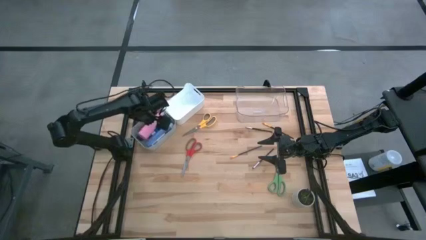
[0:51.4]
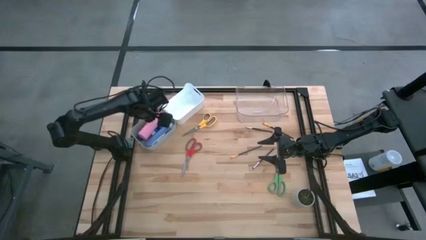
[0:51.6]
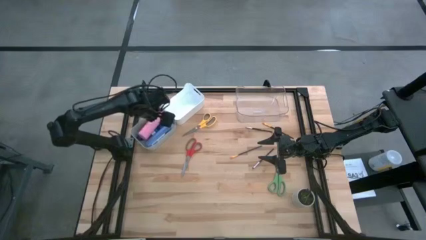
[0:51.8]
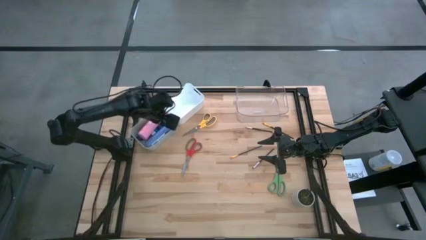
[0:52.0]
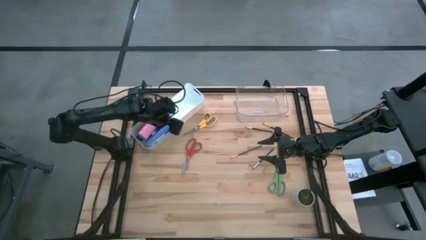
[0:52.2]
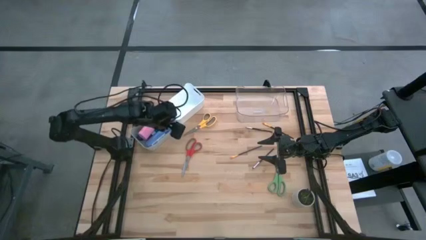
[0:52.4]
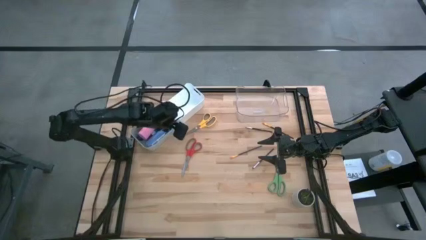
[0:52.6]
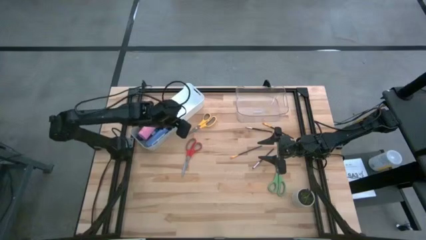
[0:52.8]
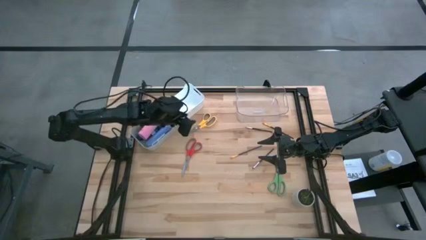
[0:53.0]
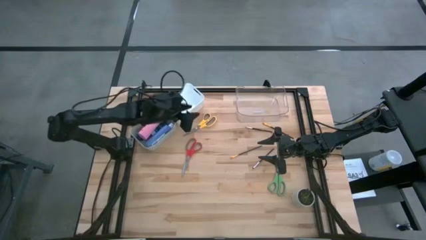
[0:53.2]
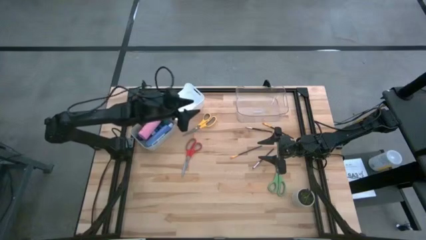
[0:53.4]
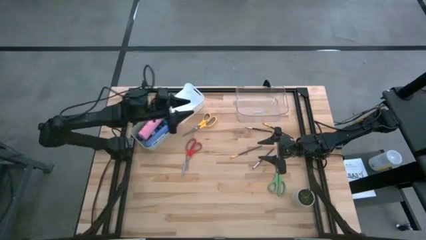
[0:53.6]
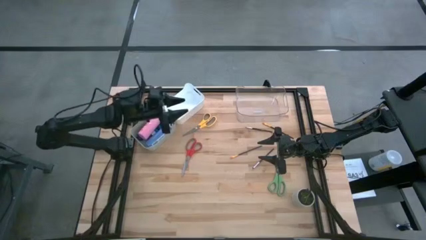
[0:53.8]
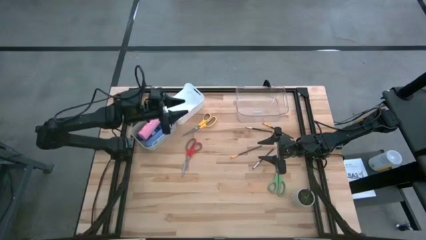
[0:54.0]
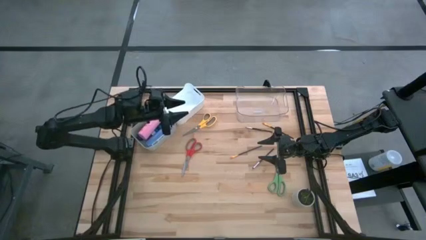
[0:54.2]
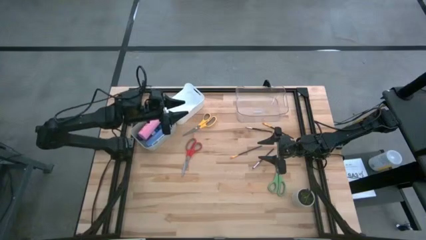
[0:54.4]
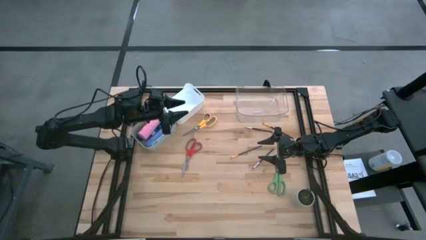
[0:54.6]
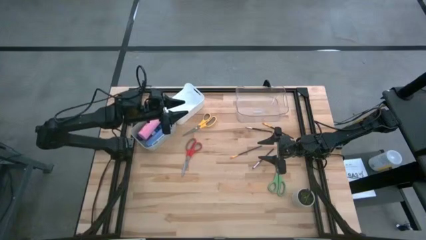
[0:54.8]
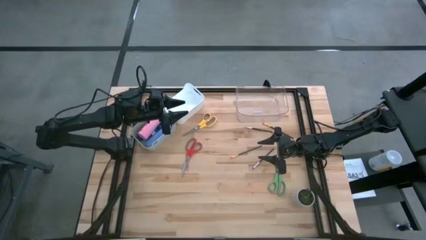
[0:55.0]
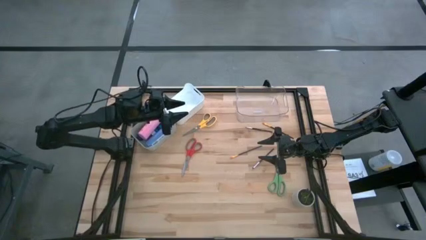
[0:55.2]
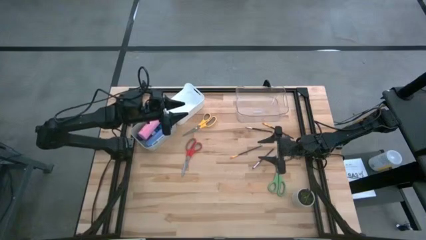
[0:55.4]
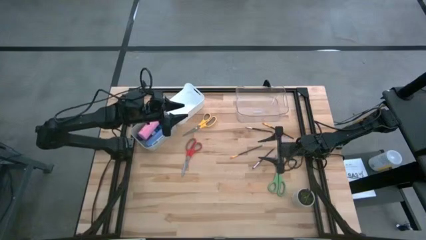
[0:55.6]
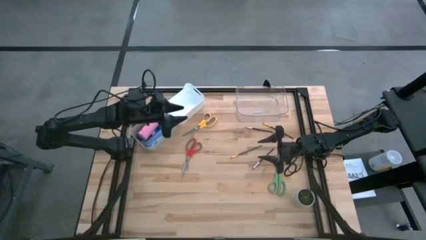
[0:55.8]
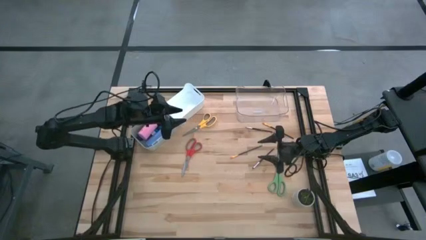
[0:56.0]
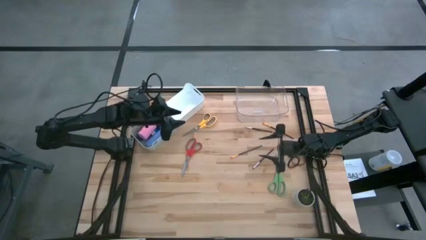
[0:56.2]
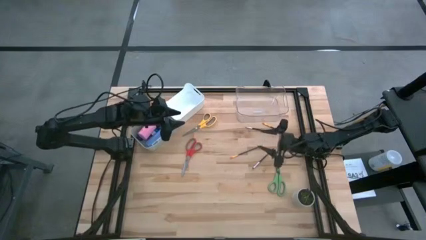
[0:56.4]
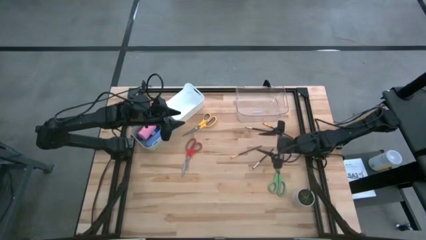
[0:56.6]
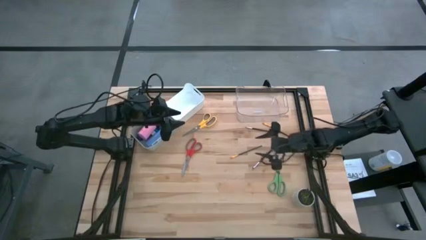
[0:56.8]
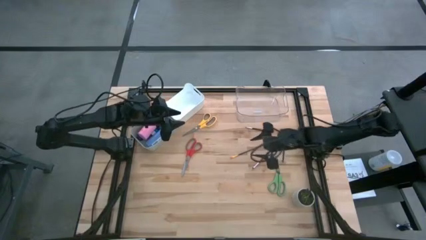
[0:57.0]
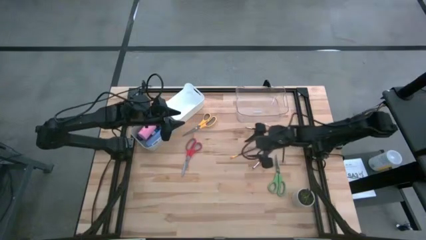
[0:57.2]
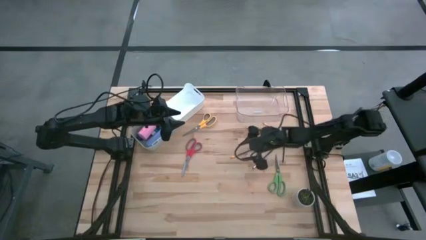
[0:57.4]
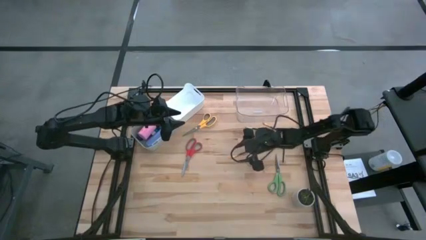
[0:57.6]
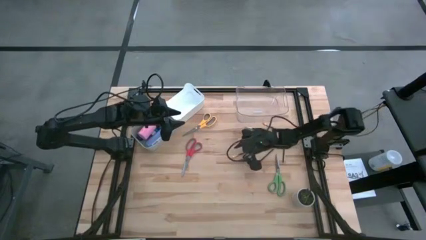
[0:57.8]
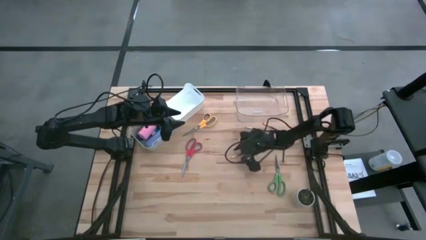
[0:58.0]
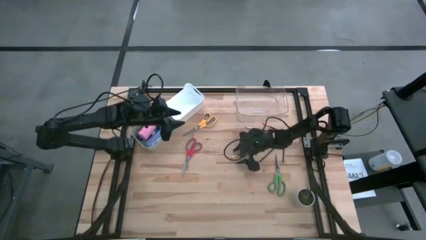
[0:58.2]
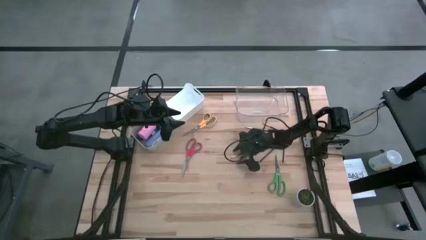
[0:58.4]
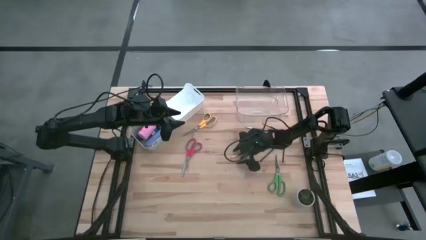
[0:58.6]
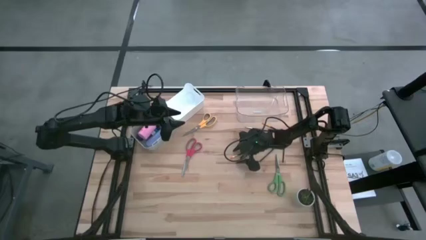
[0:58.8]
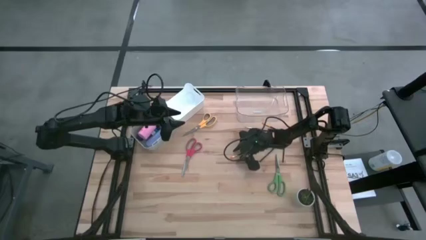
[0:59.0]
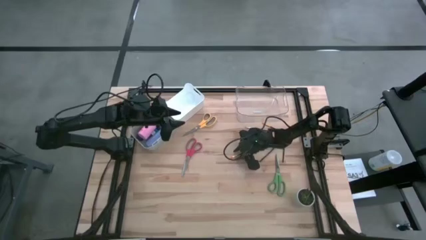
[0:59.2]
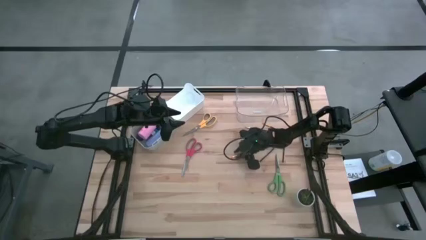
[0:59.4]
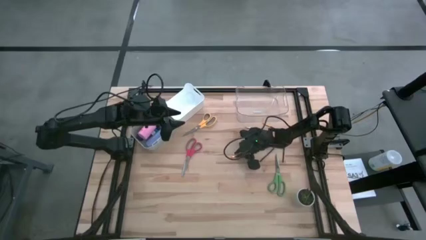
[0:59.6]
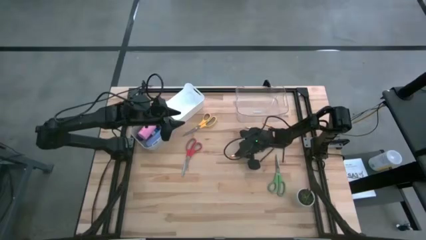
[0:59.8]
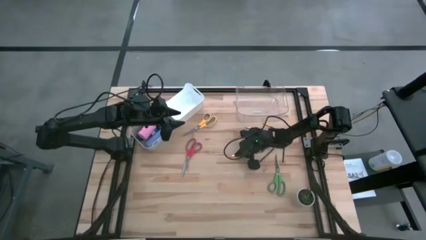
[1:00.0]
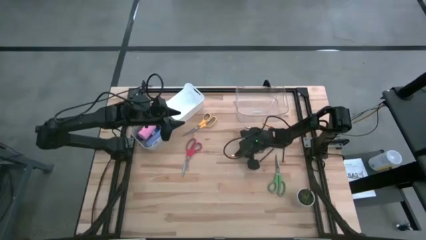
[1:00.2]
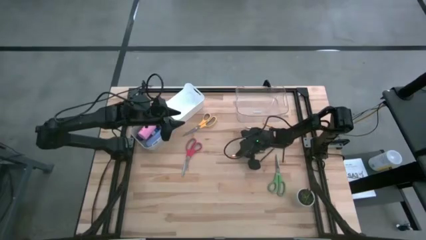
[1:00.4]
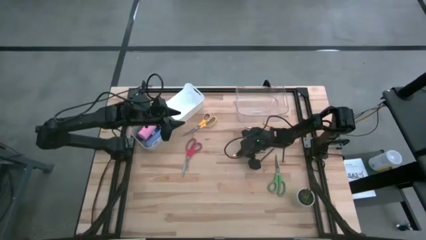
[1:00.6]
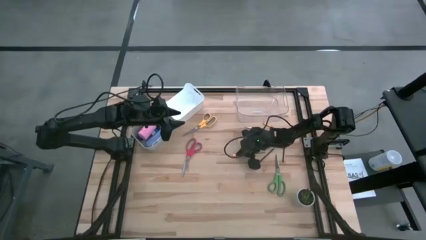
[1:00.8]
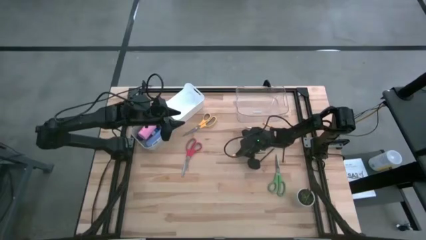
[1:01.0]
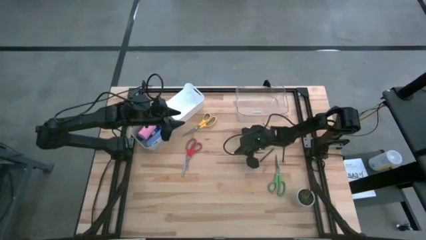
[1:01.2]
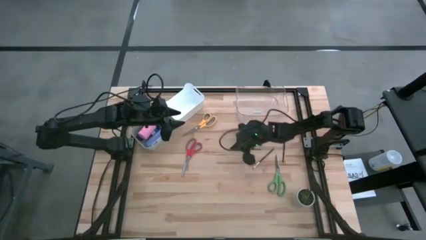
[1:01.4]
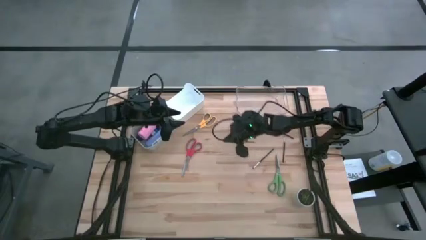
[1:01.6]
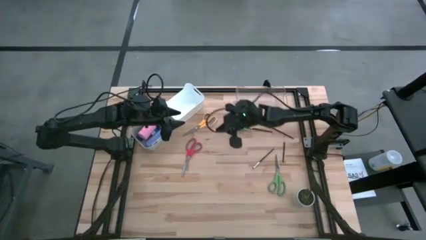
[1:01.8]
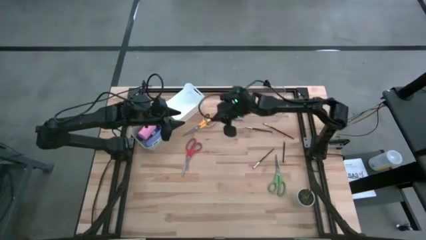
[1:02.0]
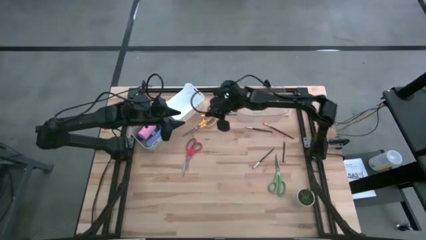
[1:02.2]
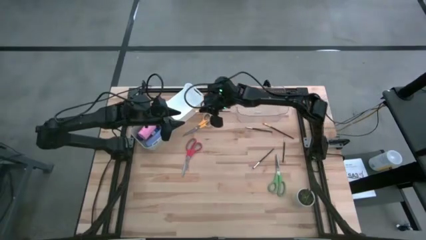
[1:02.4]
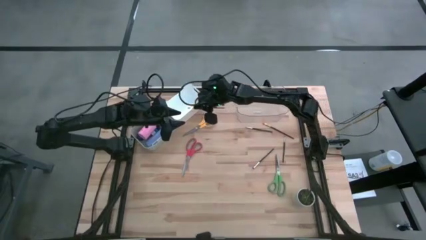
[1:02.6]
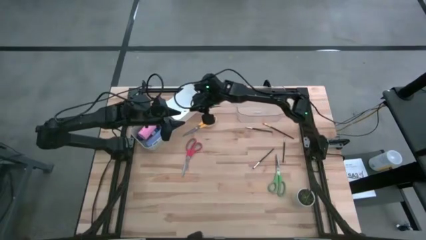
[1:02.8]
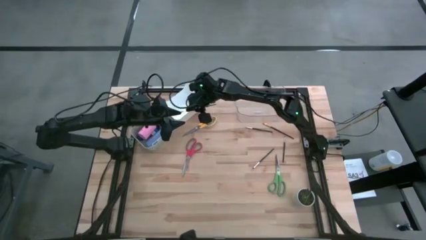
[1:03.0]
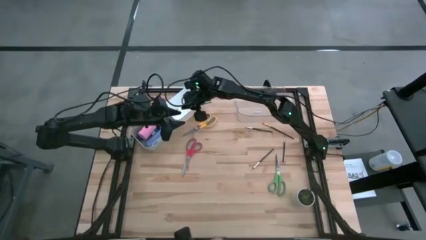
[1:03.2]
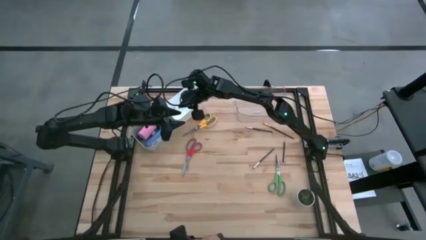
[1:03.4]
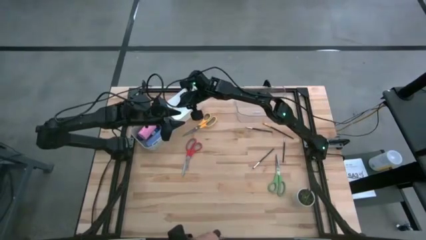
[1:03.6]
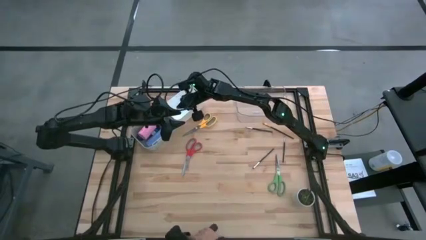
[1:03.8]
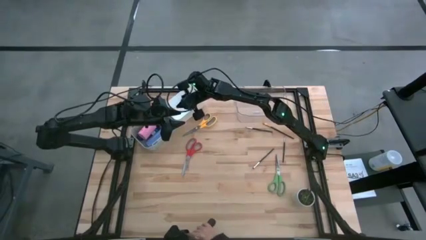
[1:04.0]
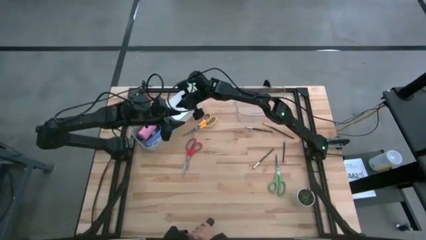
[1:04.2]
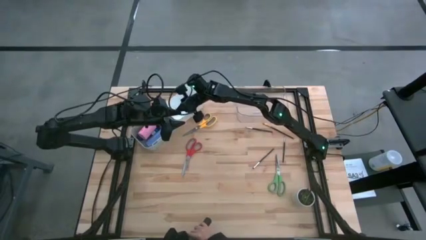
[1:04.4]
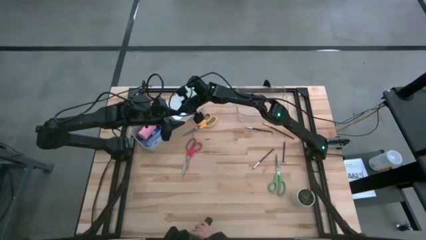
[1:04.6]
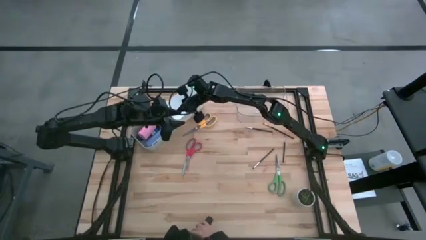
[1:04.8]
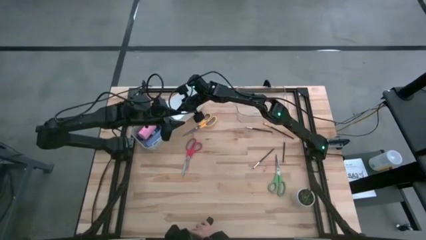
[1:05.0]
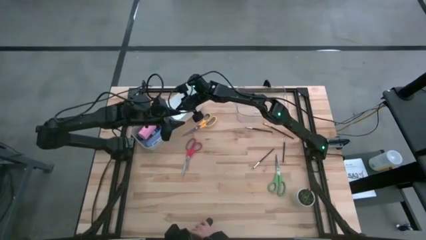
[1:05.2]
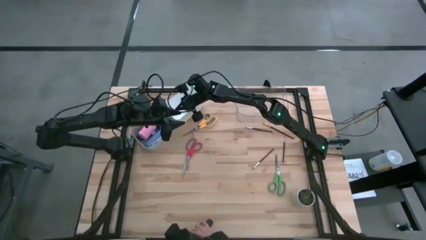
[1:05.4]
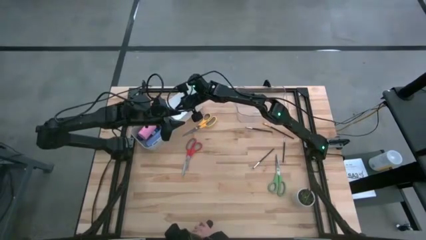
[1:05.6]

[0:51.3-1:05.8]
Task: Pick & Place Paint Supplies
Put the bottom gold paint brush into the white bin
